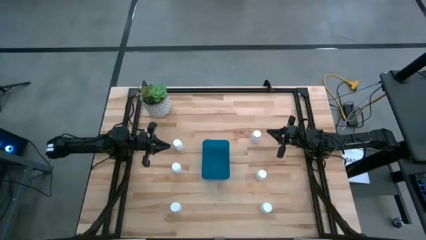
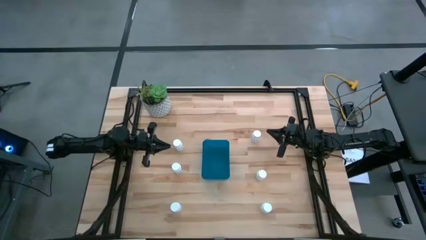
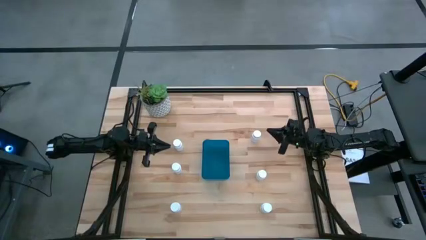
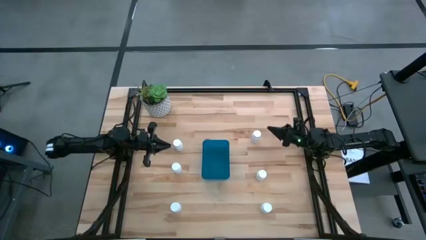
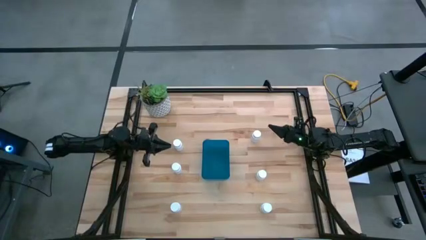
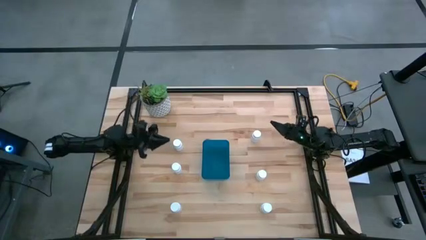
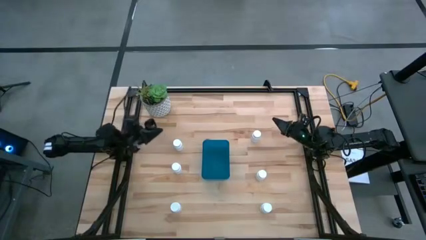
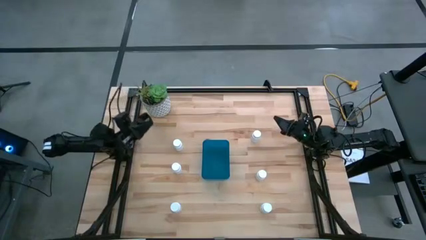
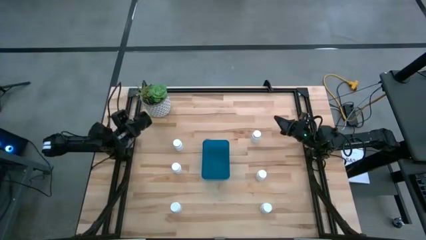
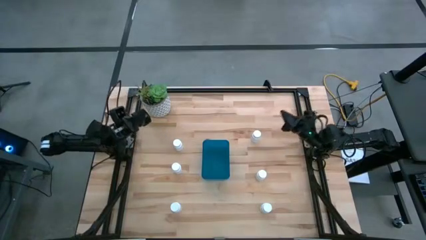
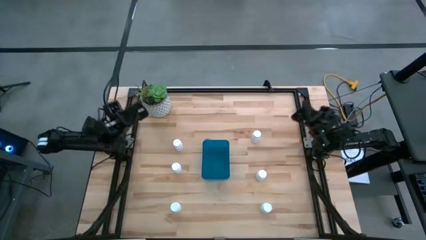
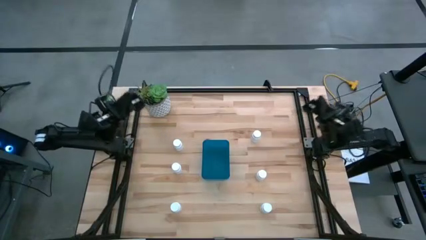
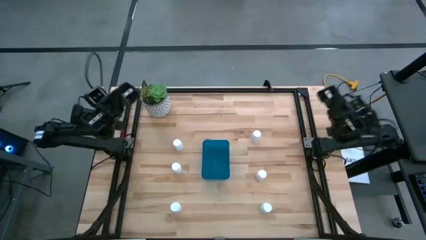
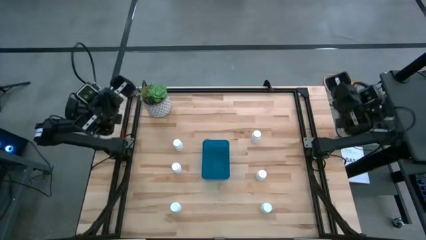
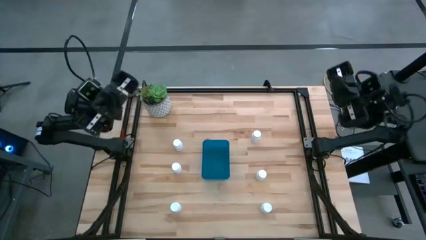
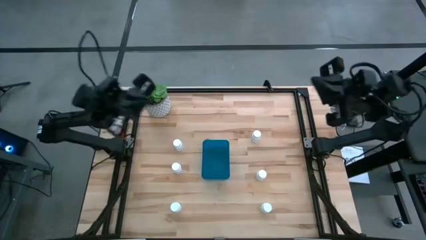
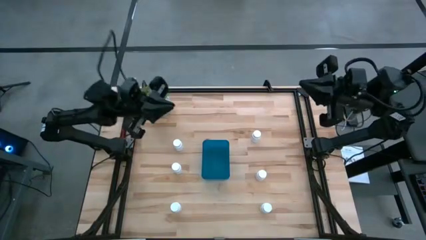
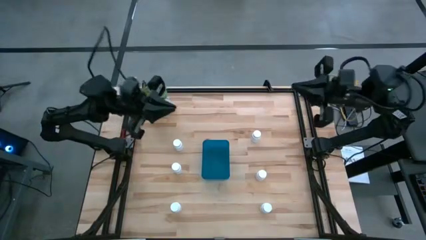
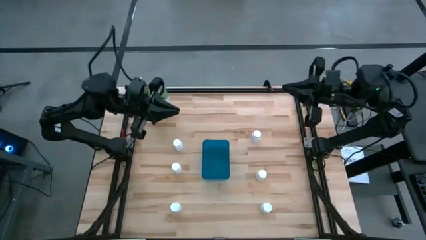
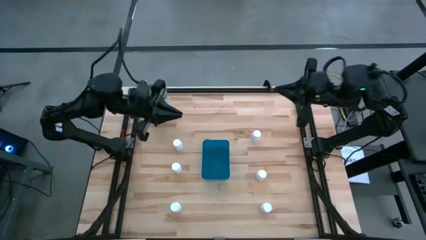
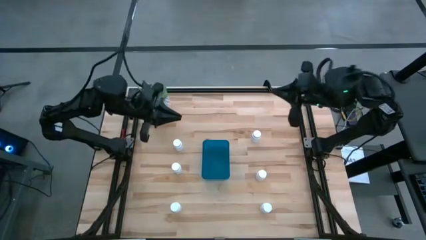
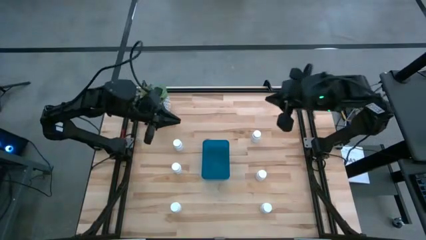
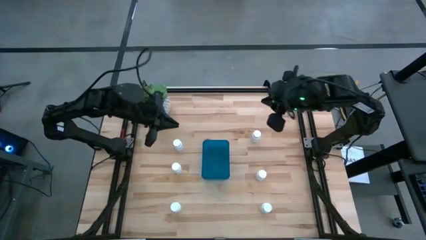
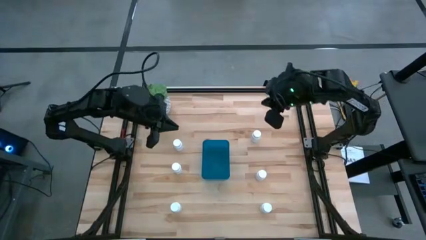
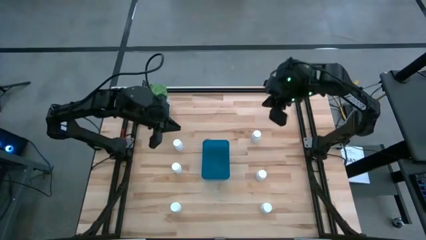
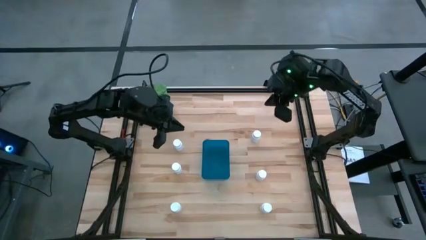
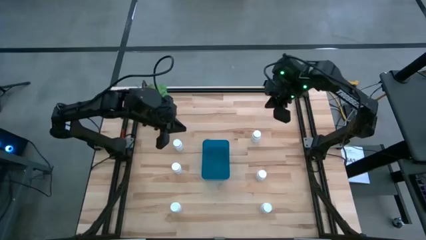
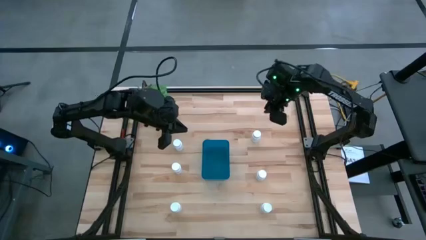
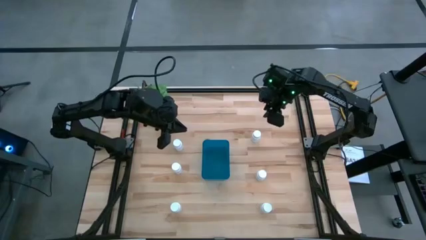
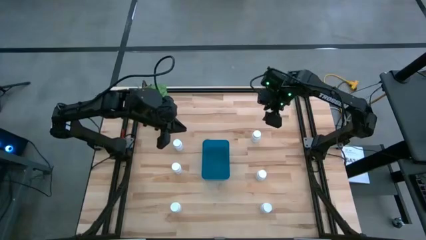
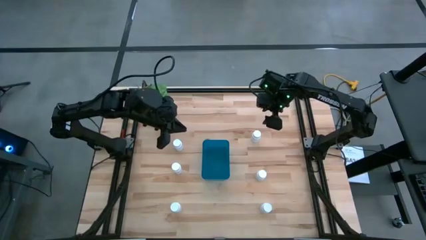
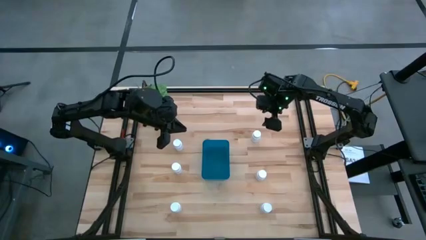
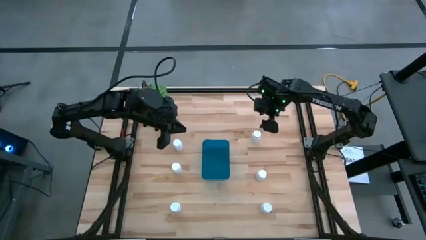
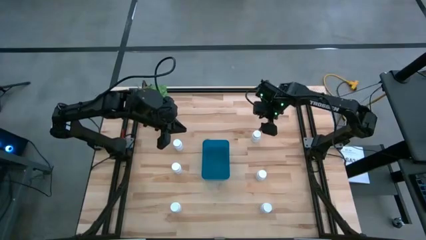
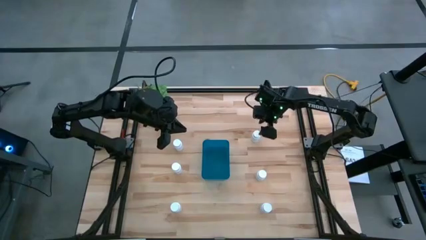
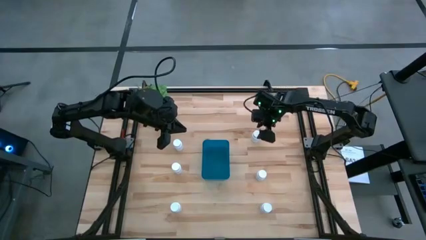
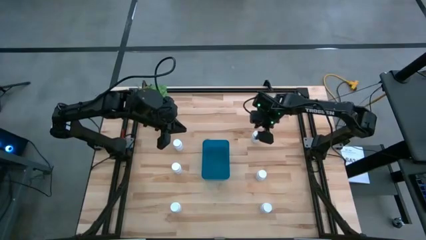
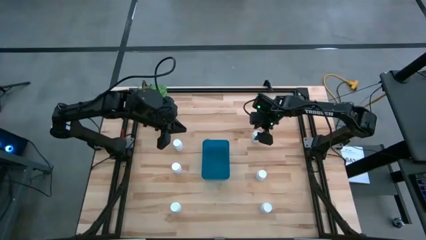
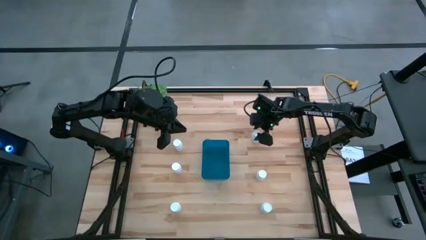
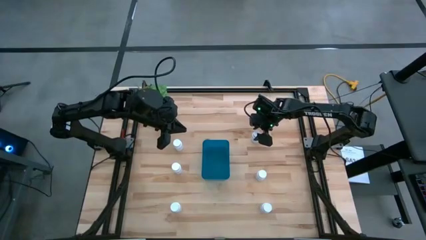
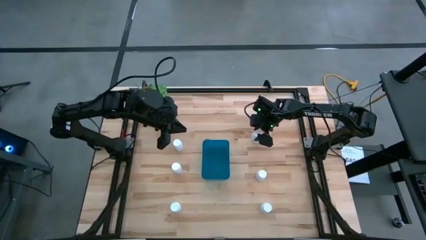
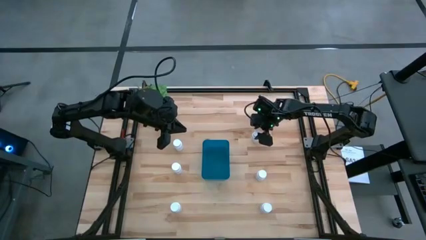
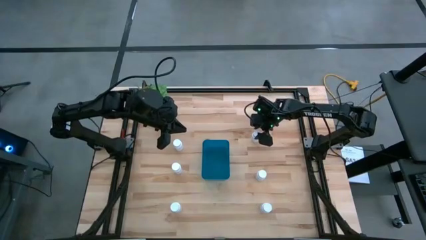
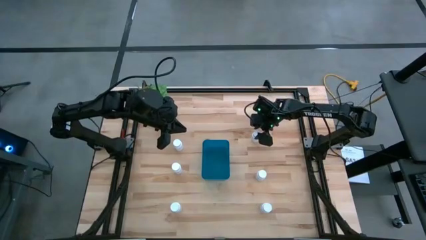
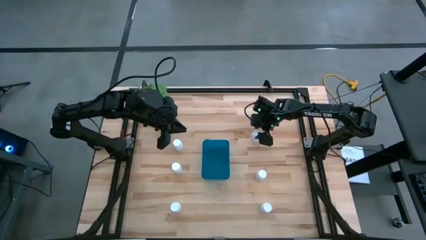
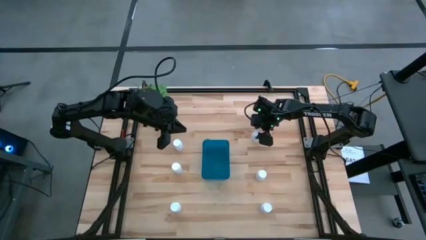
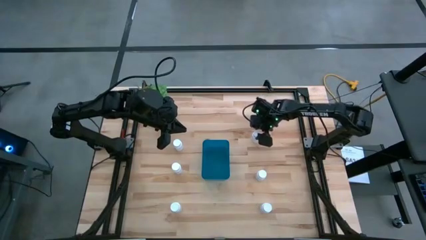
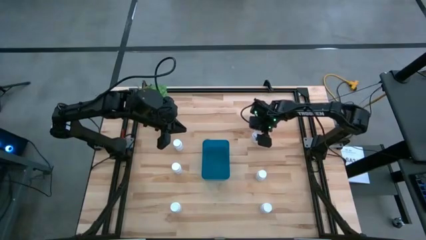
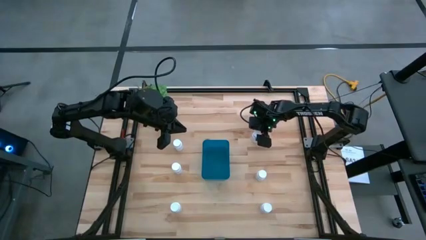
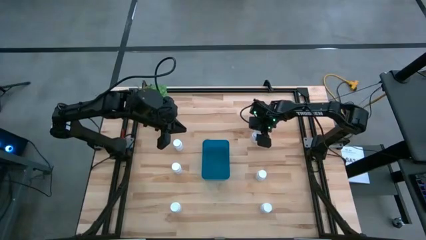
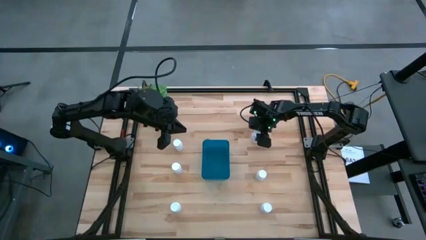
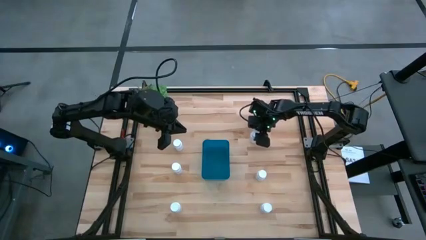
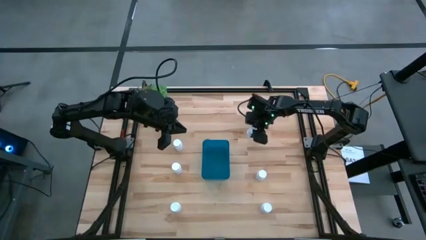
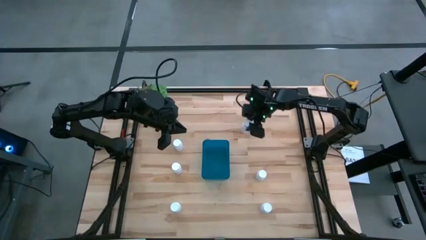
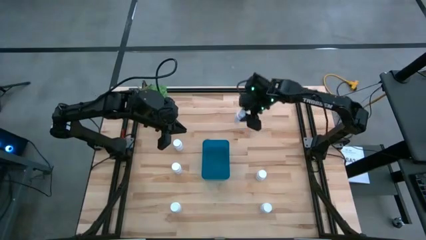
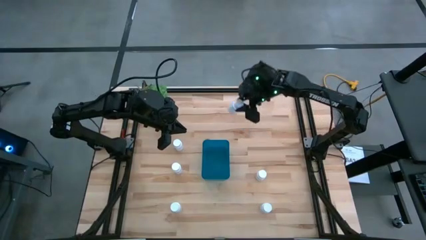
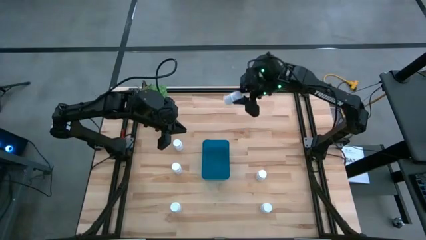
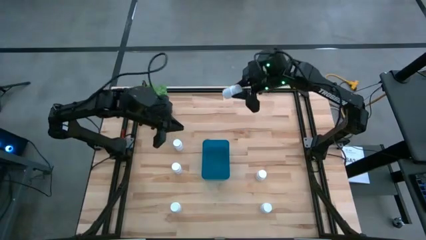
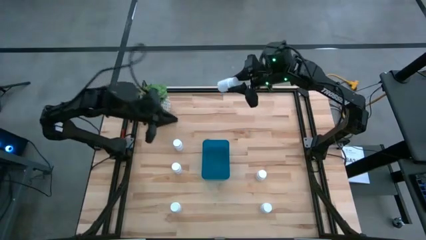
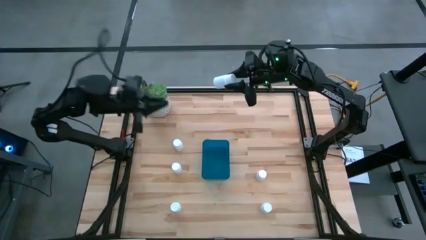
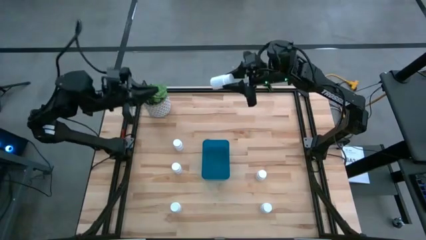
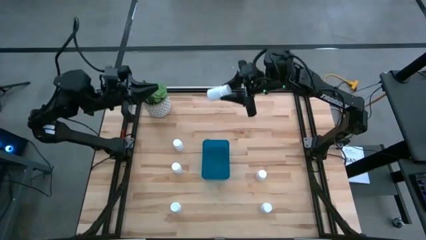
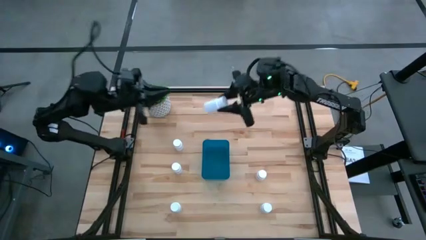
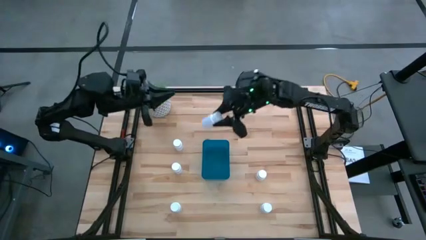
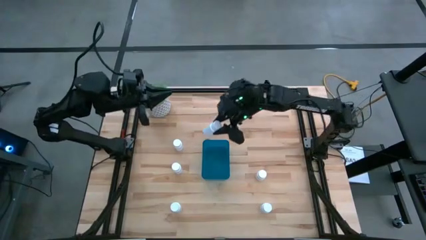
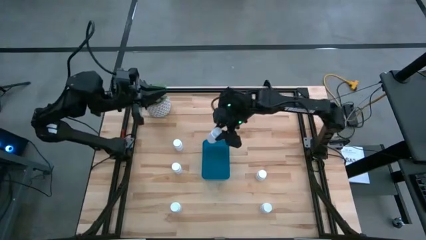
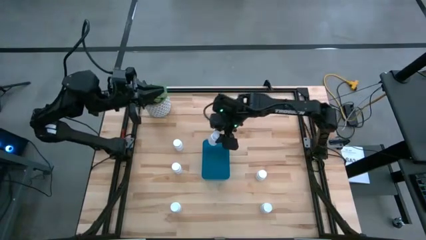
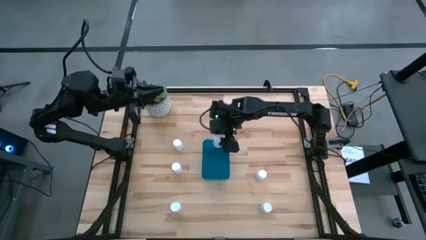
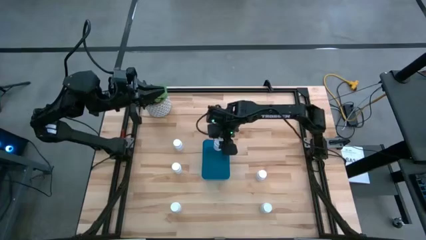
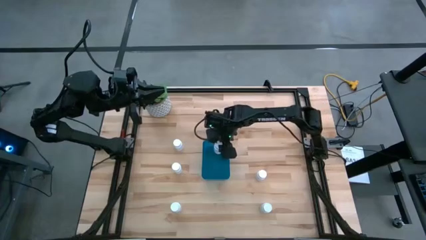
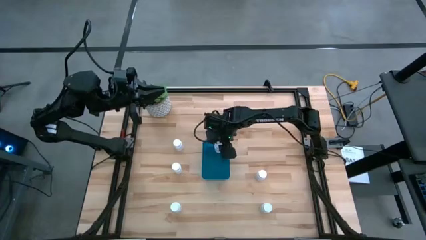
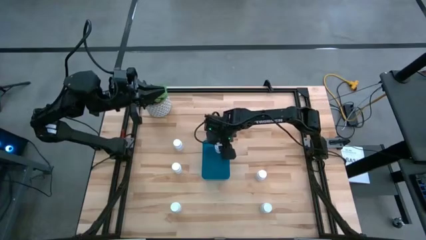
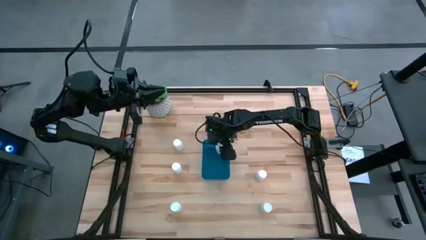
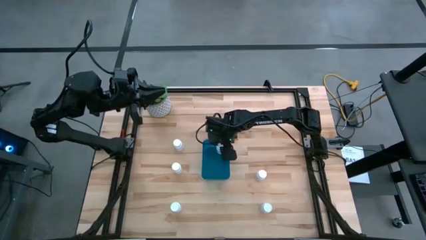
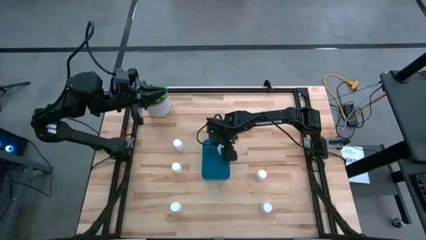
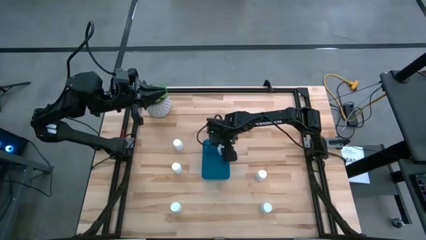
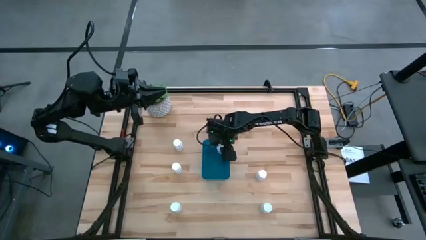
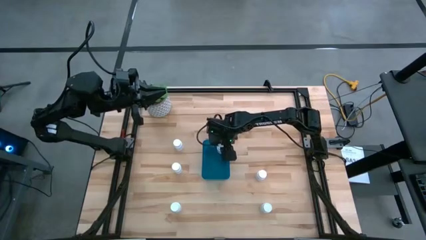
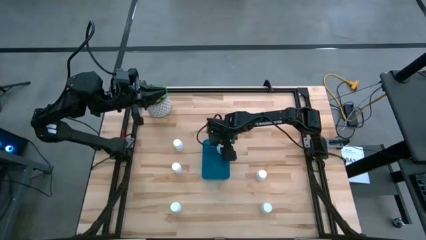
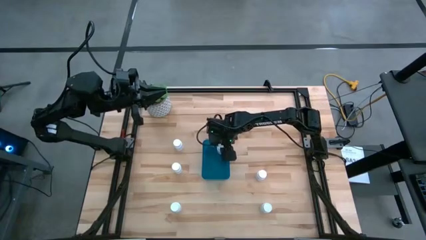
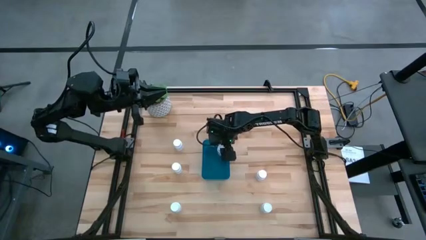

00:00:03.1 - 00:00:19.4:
Task: Pick and place pill bottles into a basket
Put the white medicine bottle into the blue bin
